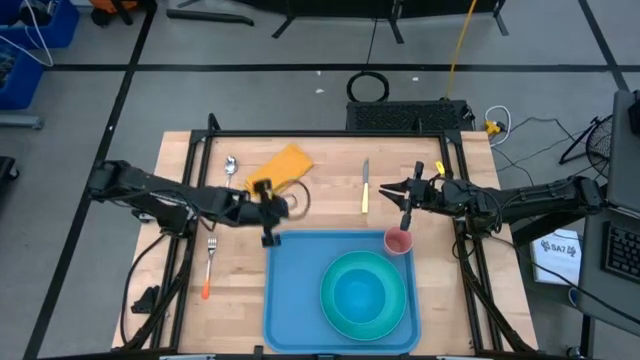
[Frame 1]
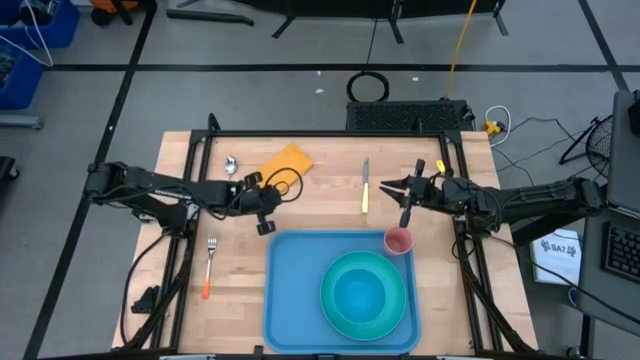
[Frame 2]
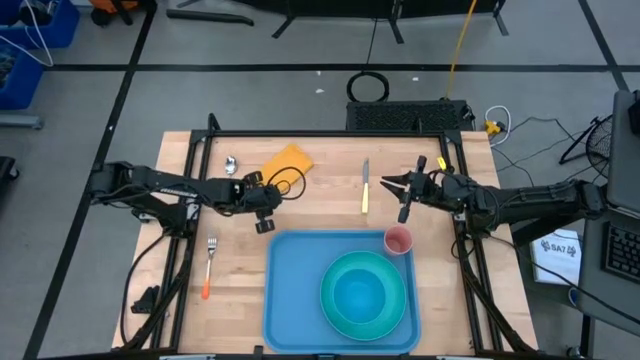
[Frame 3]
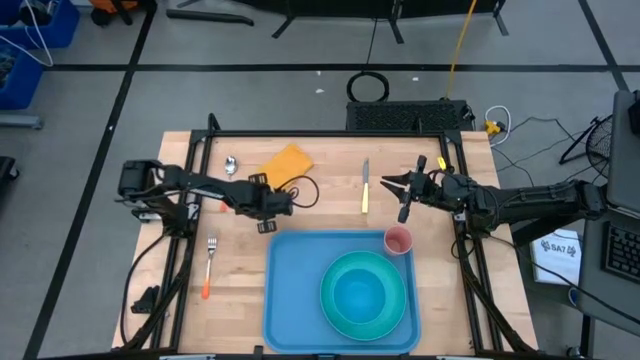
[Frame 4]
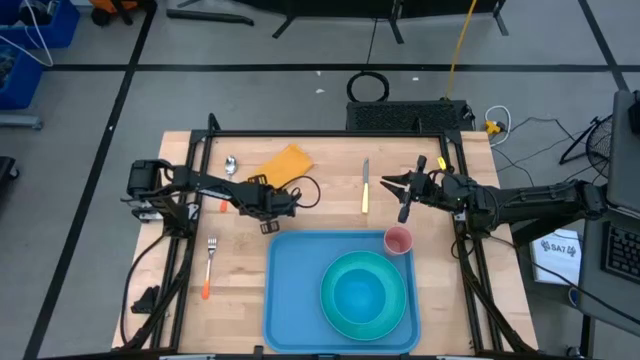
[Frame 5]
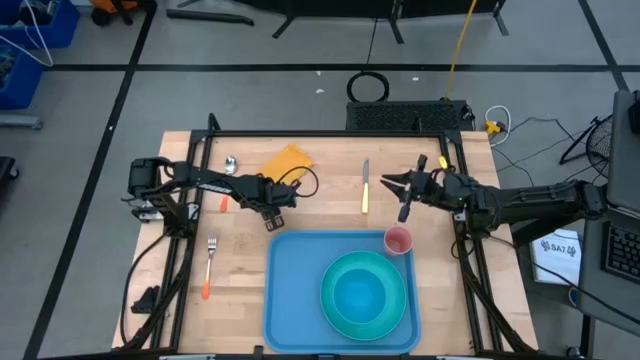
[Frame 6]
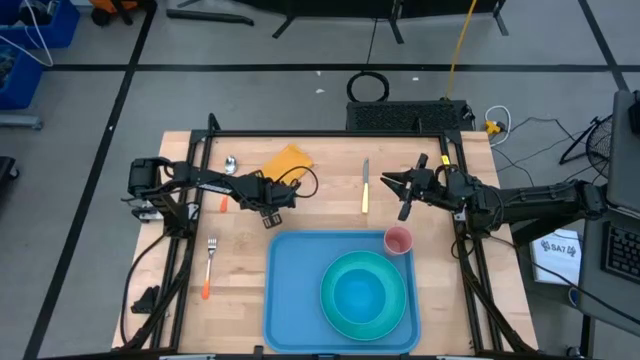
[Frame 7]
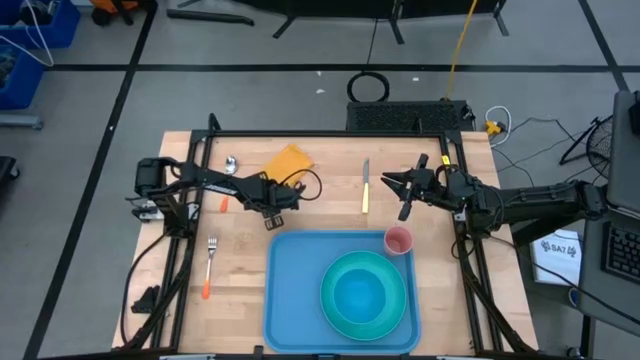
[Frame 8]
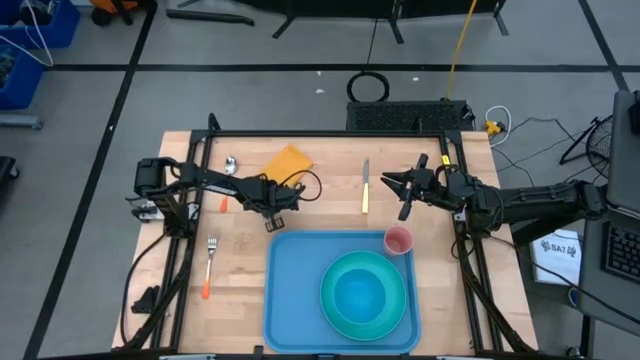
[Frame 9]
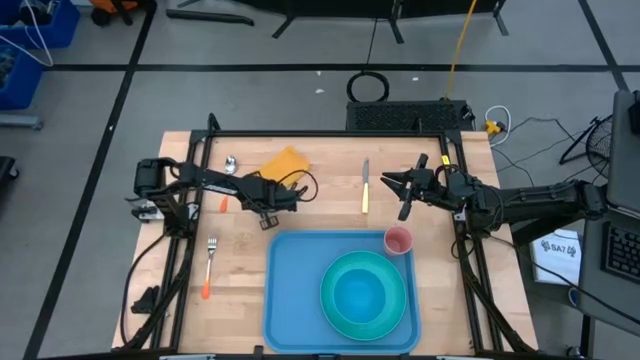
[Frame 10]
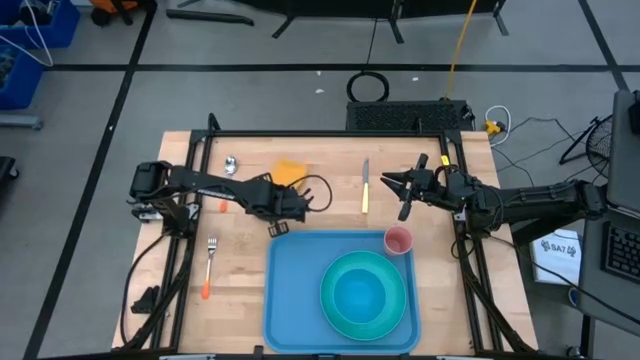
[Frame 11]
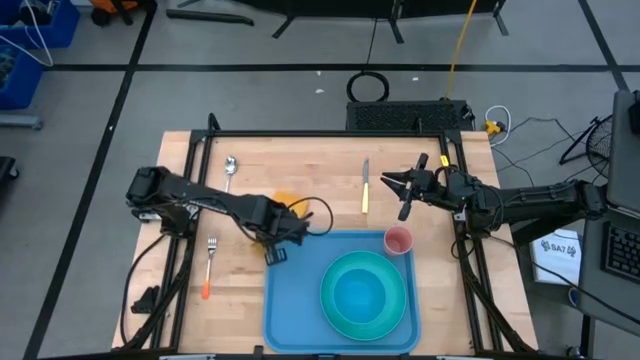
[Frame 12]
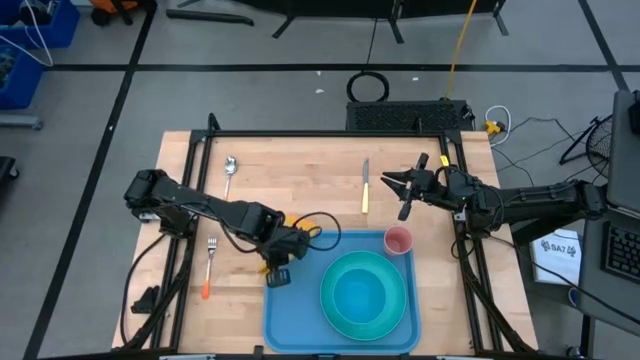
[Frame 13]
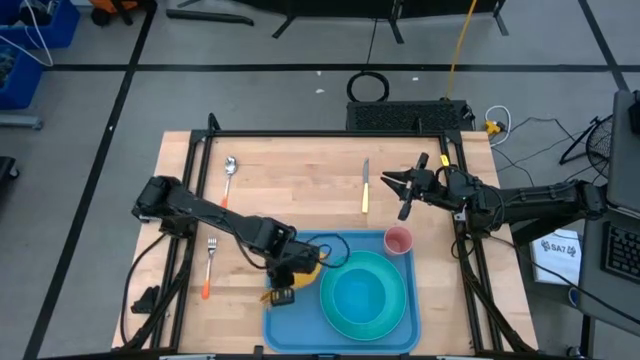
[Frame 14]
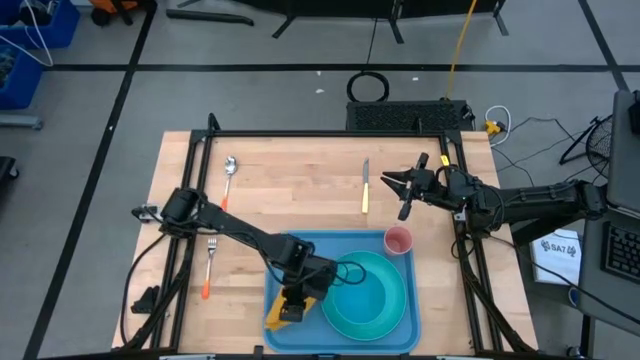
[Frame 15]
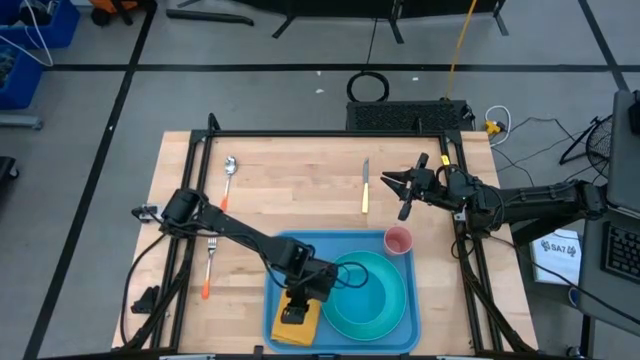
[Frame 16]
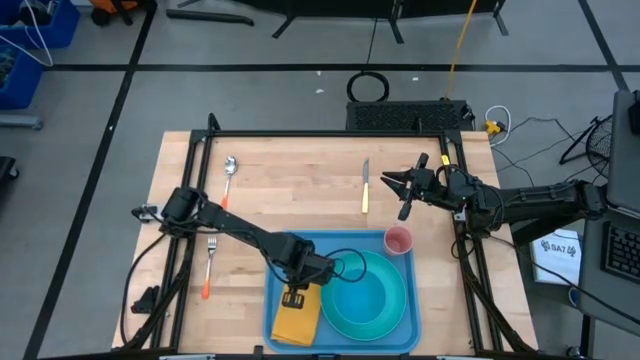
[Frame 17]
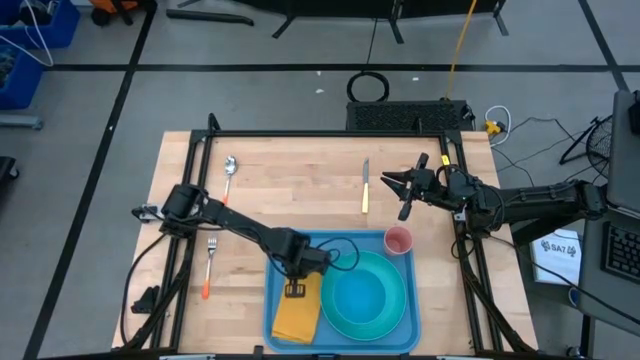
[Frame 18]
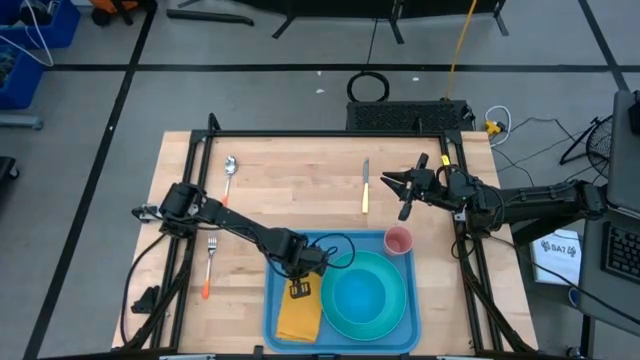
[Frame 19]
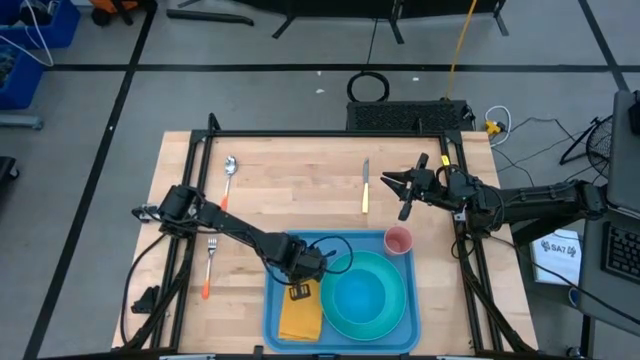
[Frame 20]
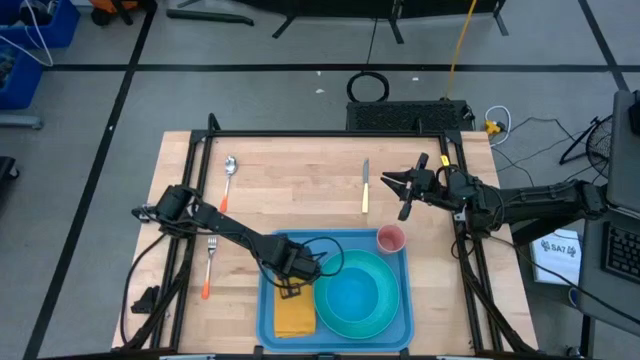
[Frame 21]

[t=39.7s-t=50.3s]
Task: Set up tray
Put the yellow table napkin on the blue tray beside the light blue plate

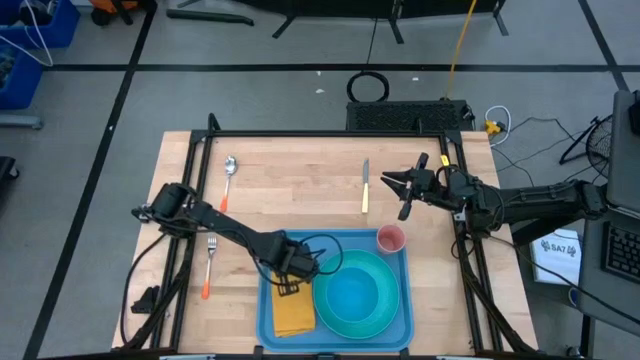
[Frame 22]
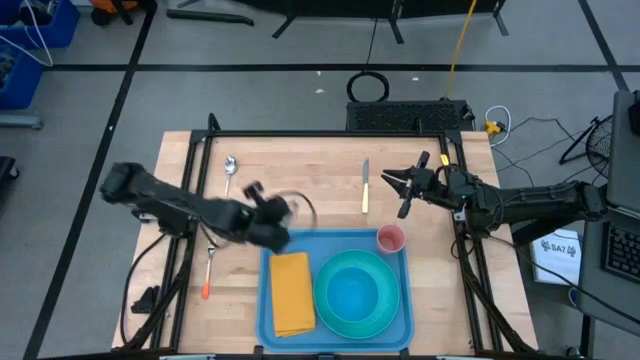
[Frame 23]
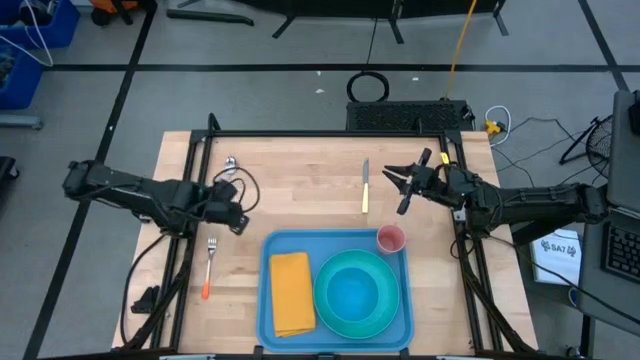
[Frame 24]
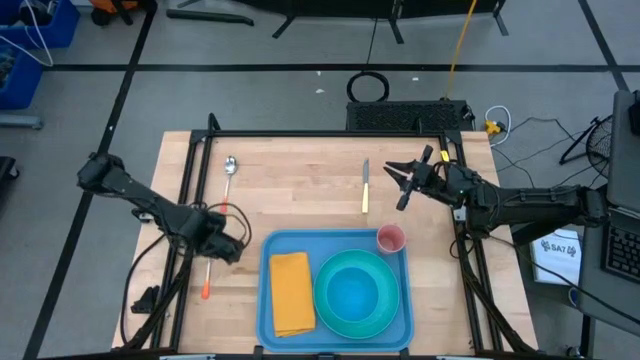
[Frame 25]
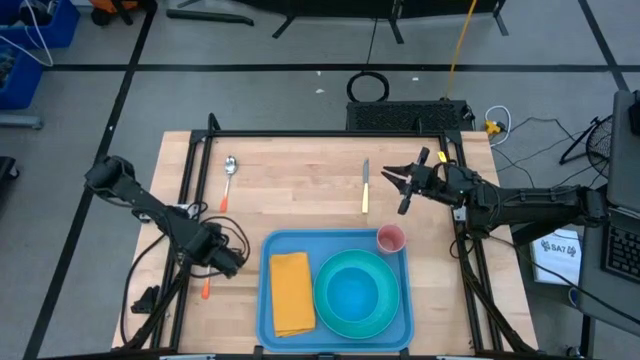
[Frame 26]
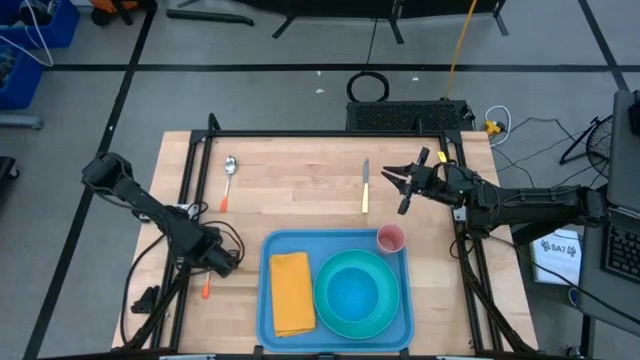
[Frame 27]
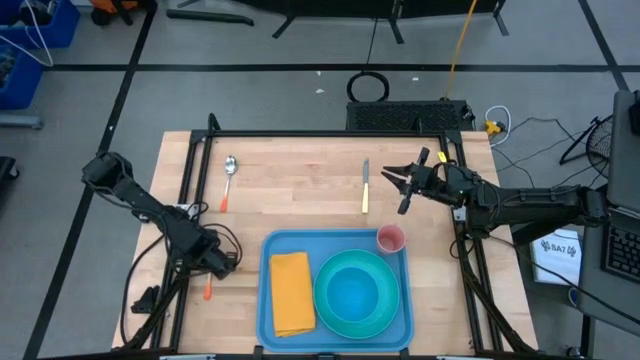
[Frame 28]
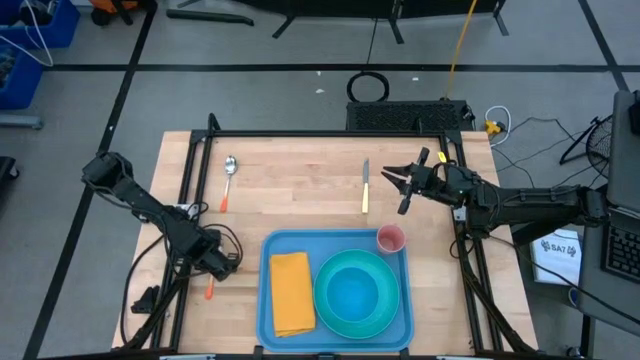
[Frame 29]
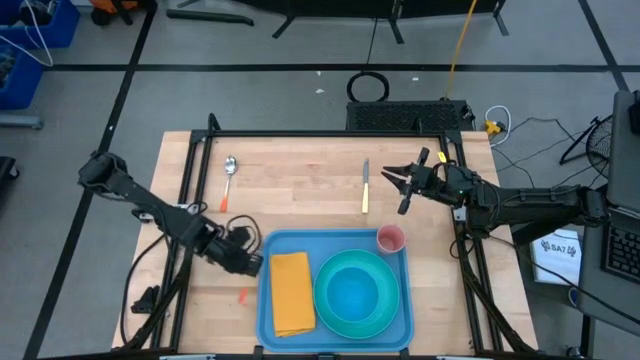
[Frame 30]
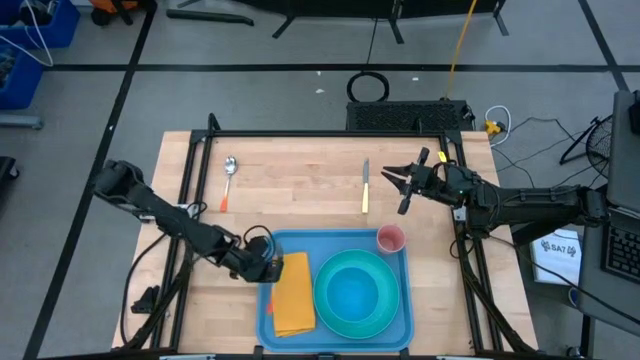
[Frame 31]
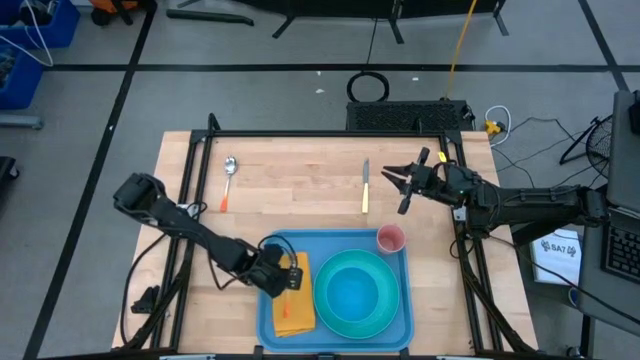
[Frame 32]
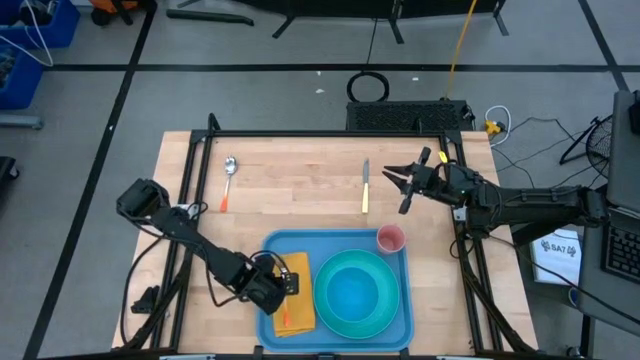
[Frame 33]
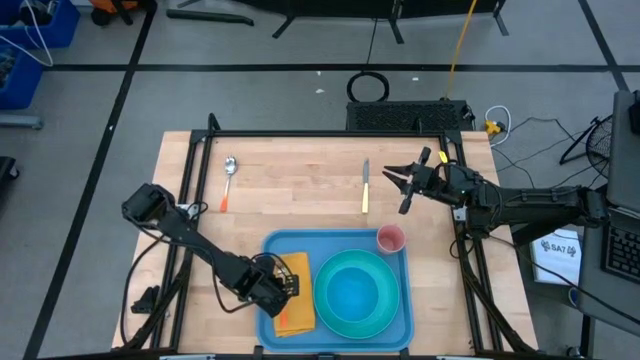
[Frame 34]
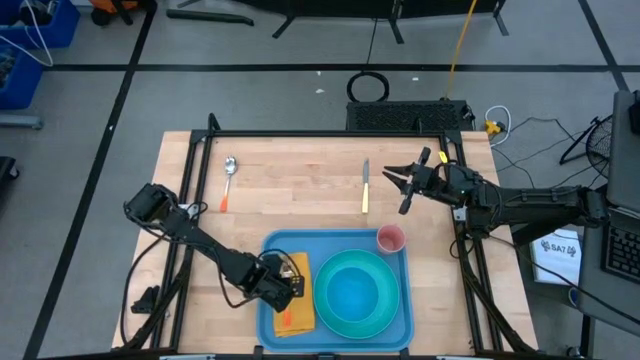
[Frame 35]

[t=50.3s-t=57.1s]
Put the orange fork on the yellow table napkin

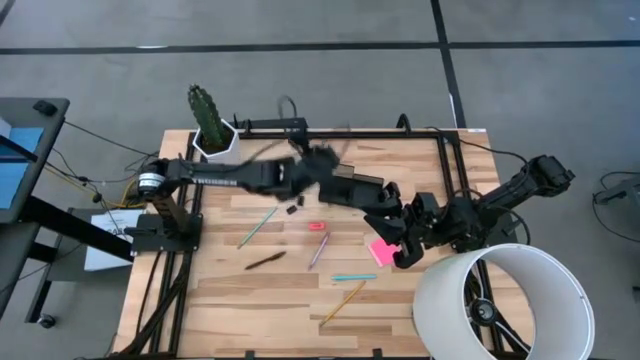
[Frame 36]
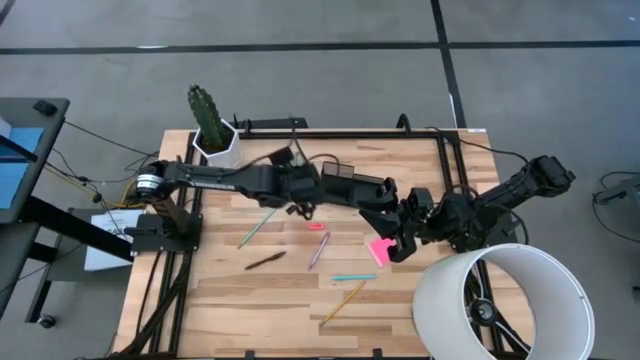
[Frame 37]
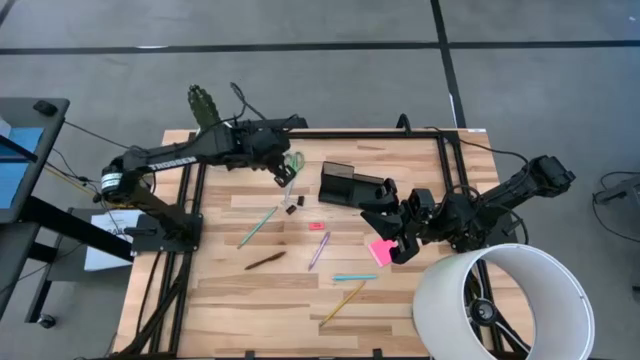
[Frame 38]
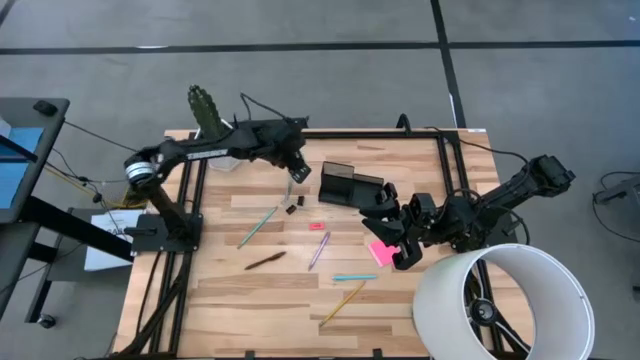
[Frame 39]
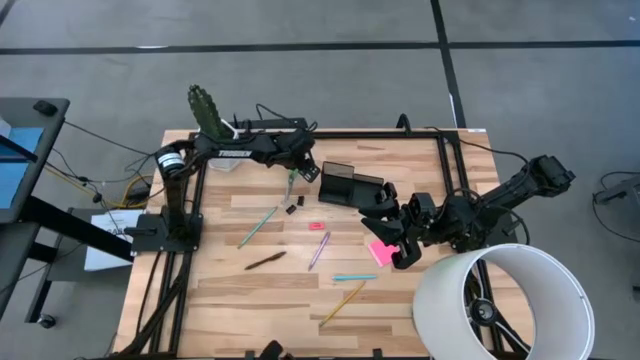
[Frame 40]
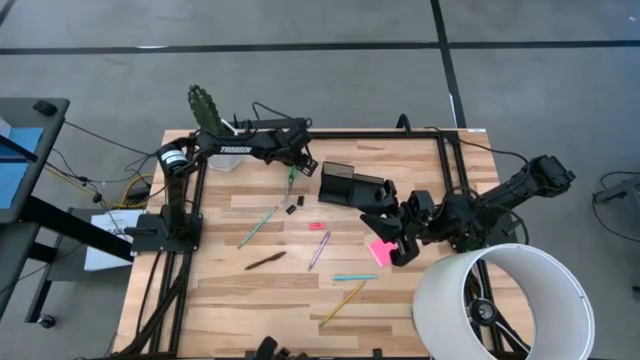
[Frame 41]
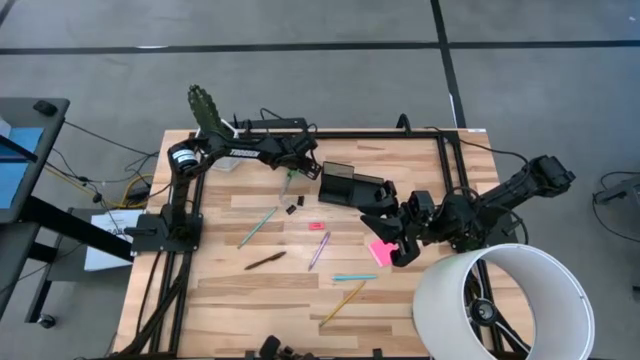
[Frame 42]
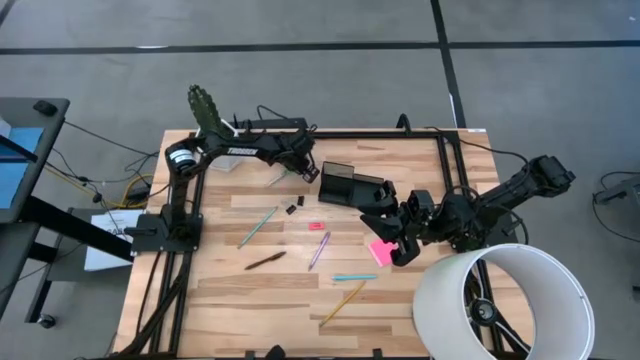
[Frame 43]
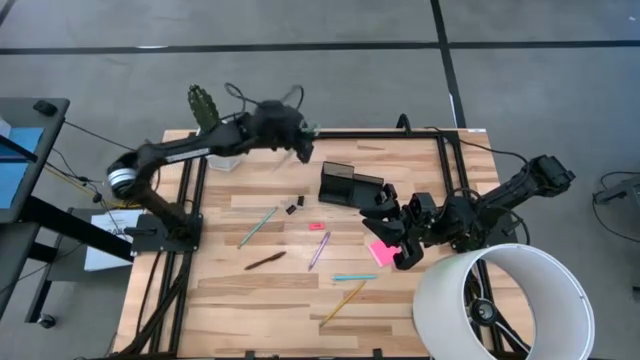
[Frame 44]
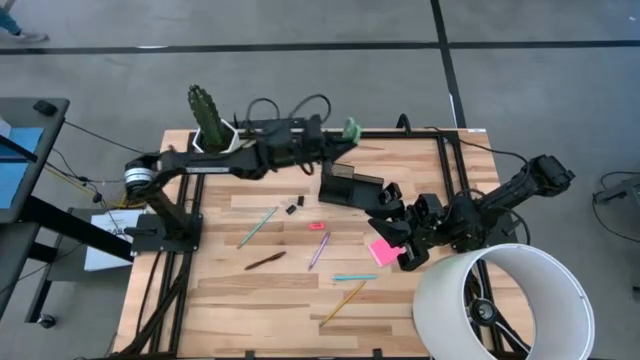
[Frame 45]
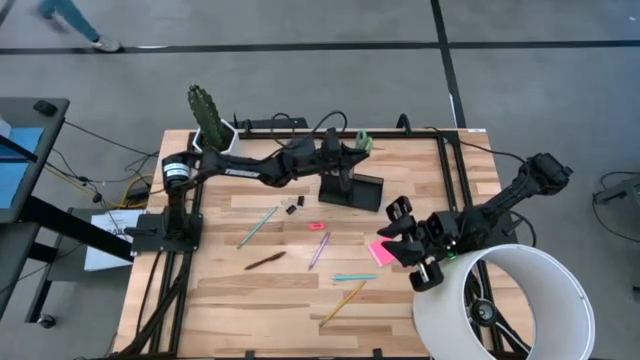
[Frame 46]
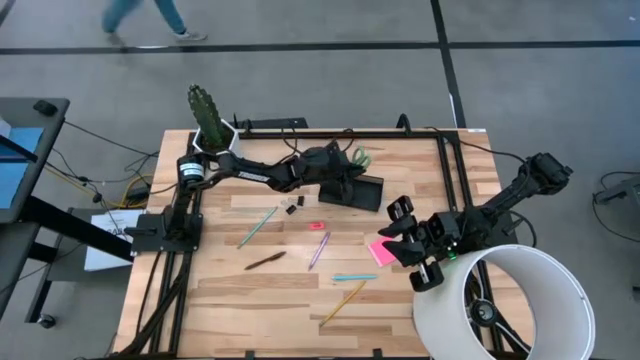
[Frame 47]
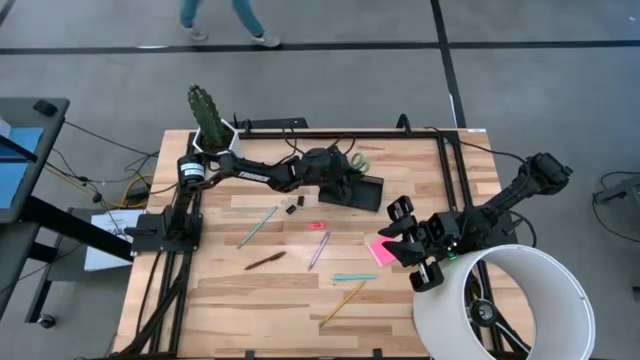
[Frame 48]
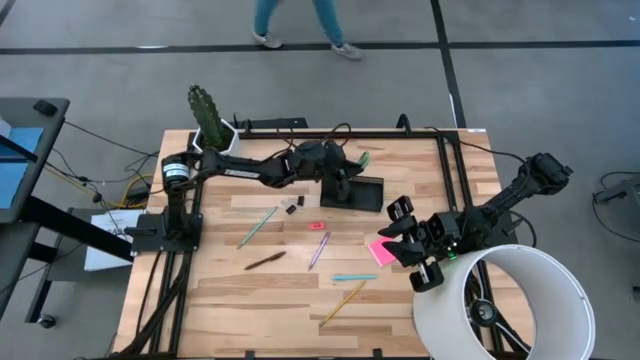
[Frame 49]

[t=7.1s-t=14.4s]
Task: Pick and place office supplies into organizer
Put the green scissors into the black desk organizer
